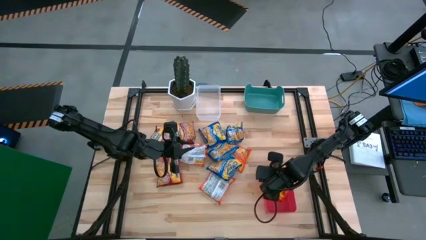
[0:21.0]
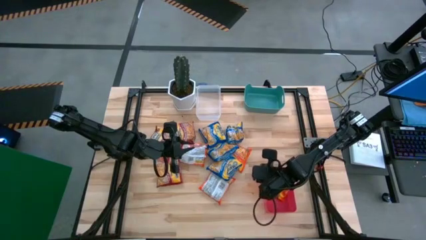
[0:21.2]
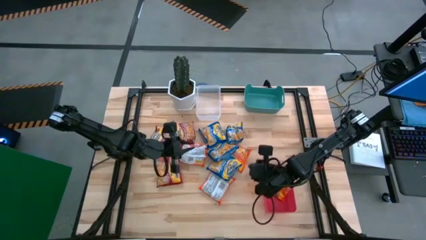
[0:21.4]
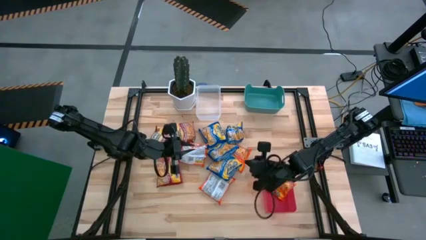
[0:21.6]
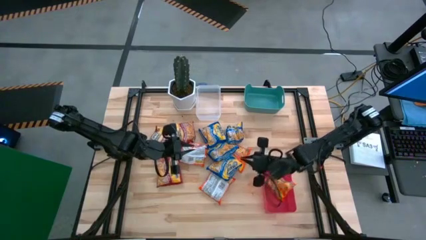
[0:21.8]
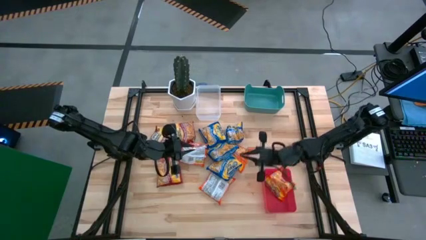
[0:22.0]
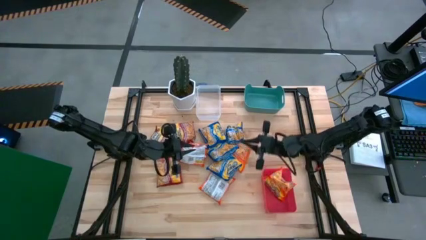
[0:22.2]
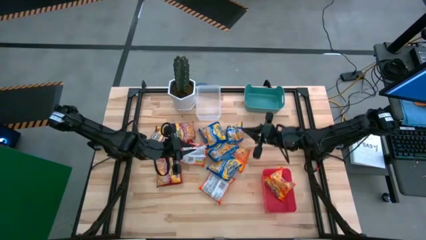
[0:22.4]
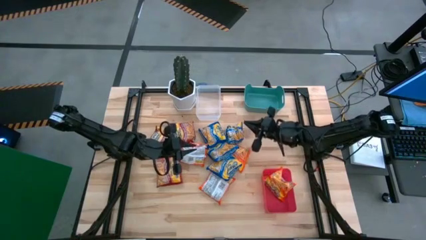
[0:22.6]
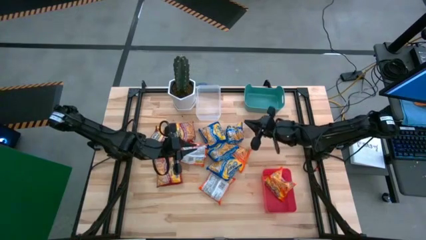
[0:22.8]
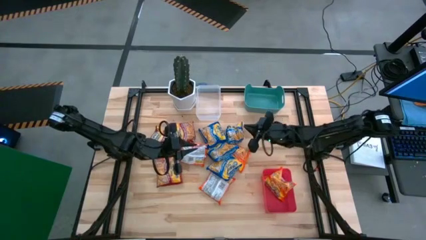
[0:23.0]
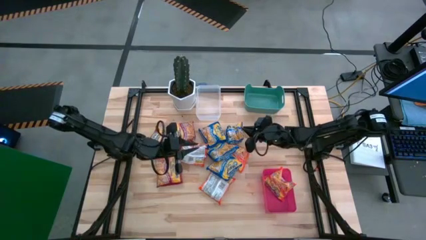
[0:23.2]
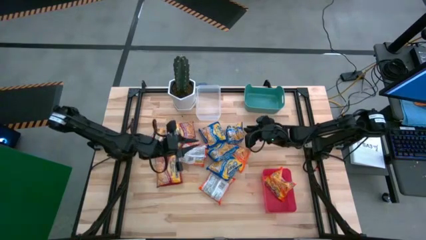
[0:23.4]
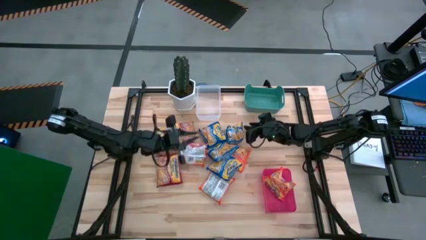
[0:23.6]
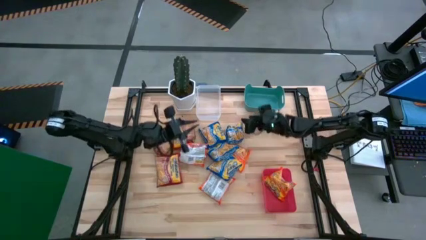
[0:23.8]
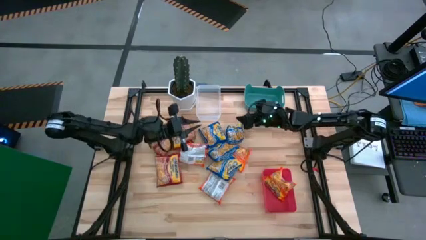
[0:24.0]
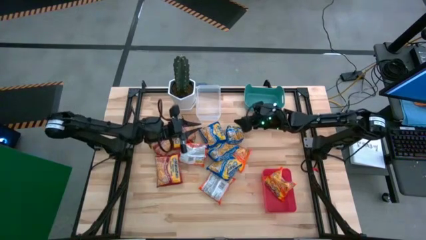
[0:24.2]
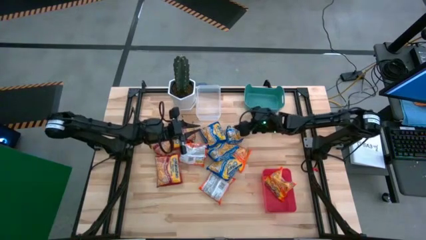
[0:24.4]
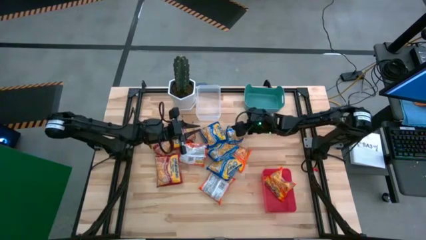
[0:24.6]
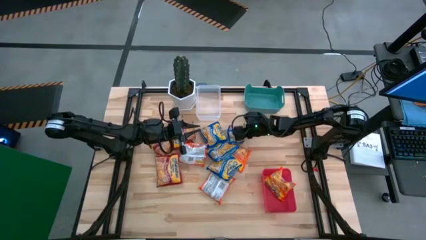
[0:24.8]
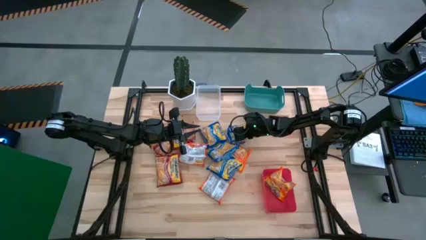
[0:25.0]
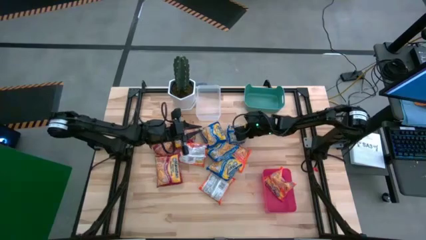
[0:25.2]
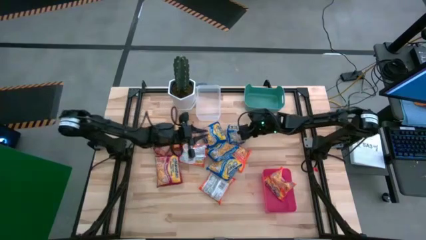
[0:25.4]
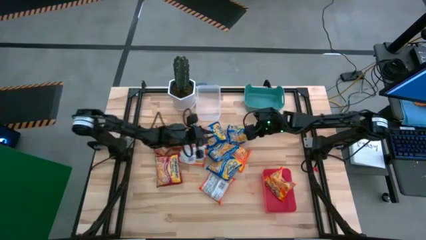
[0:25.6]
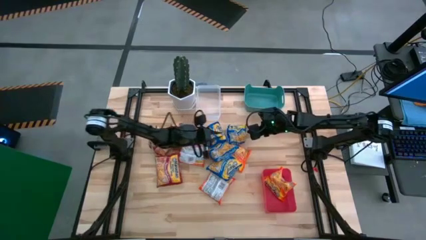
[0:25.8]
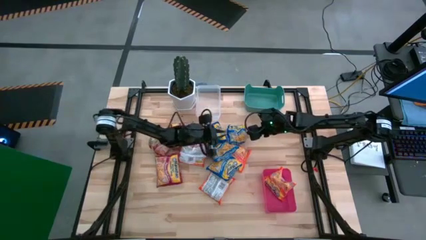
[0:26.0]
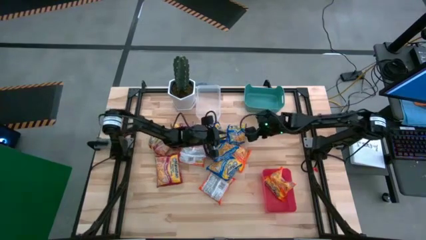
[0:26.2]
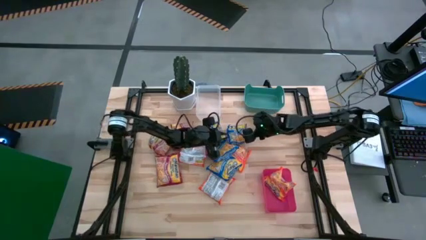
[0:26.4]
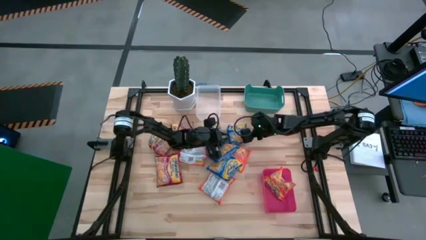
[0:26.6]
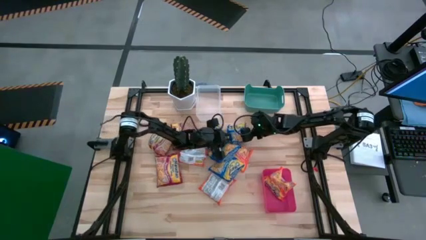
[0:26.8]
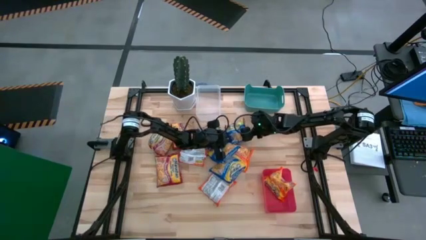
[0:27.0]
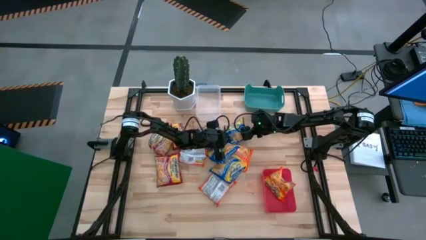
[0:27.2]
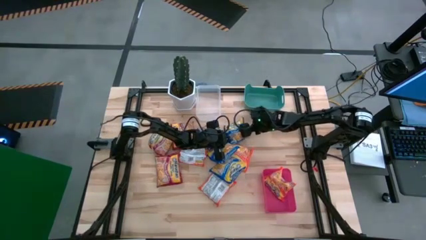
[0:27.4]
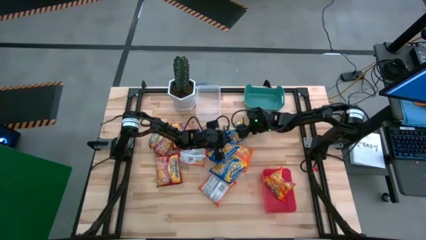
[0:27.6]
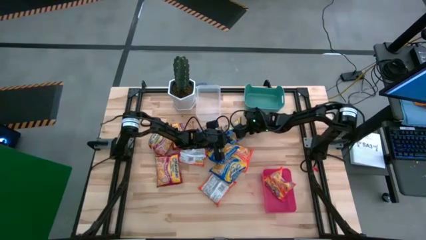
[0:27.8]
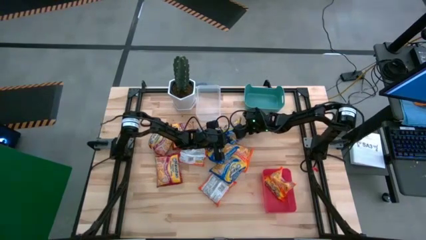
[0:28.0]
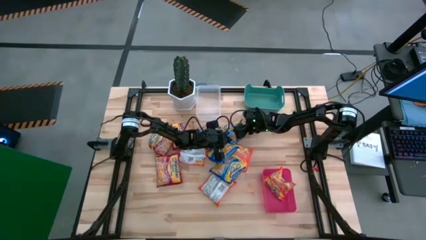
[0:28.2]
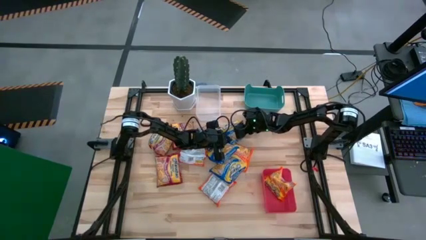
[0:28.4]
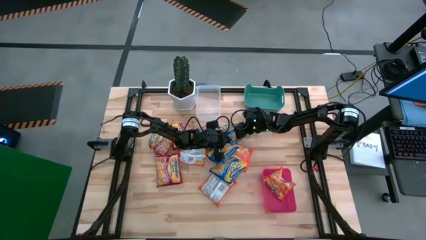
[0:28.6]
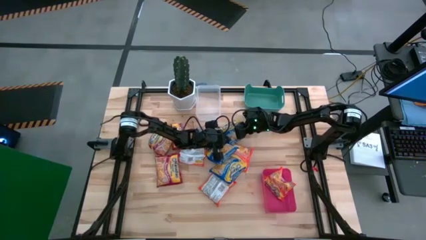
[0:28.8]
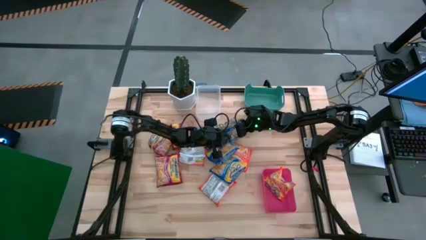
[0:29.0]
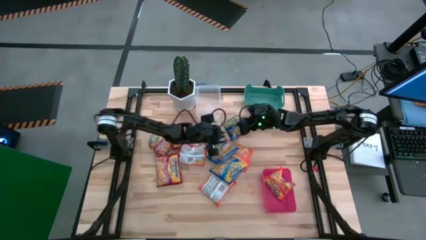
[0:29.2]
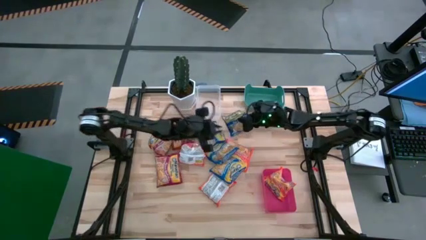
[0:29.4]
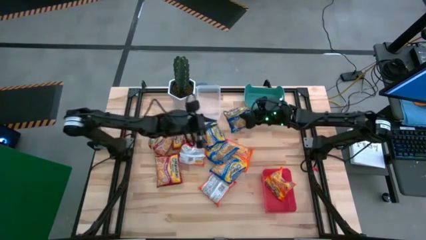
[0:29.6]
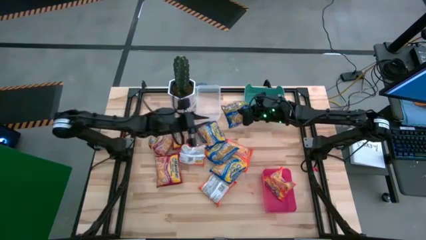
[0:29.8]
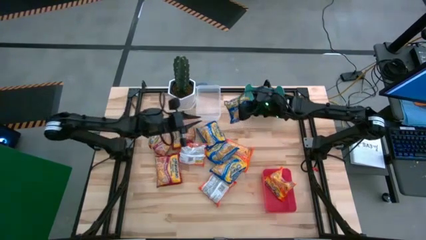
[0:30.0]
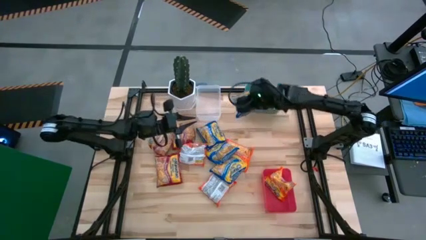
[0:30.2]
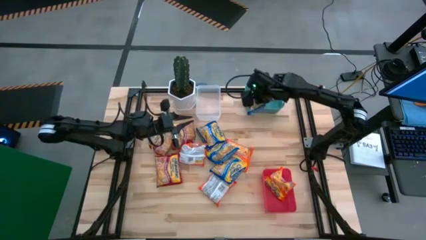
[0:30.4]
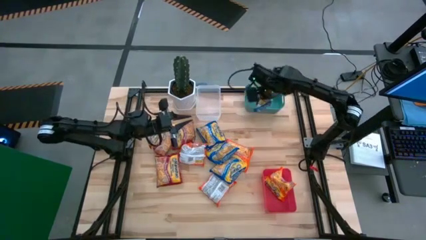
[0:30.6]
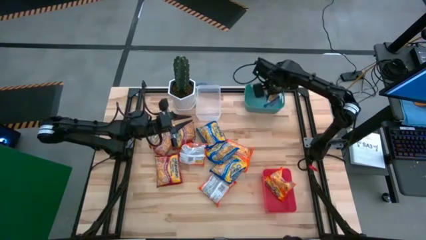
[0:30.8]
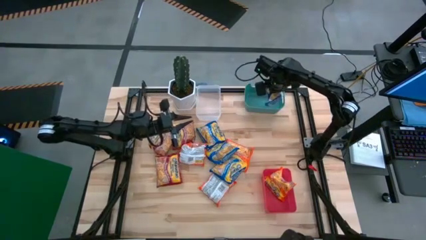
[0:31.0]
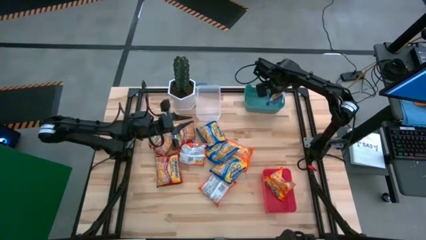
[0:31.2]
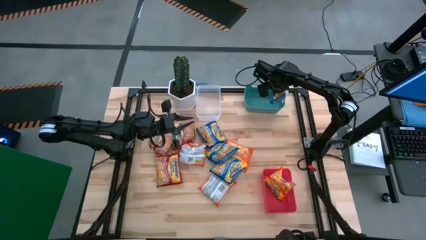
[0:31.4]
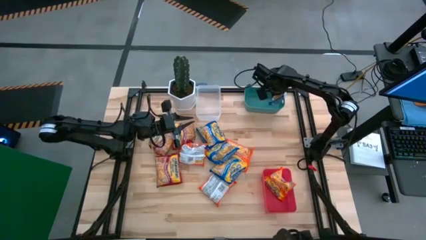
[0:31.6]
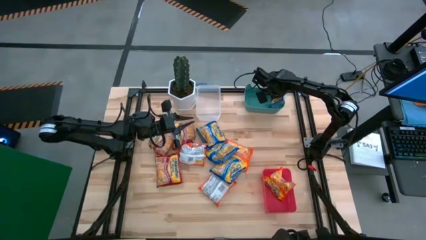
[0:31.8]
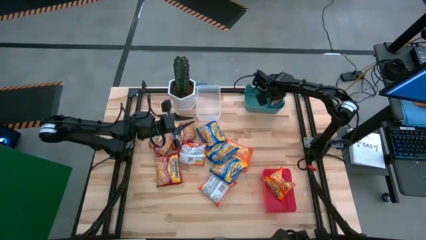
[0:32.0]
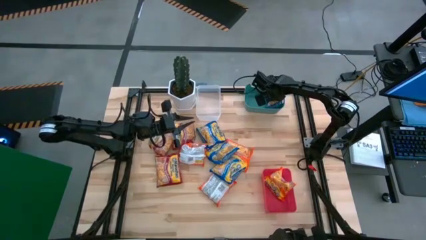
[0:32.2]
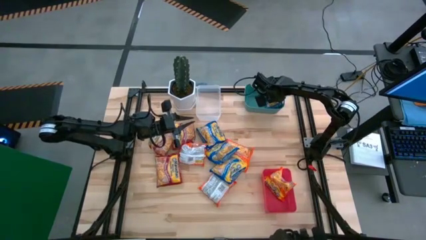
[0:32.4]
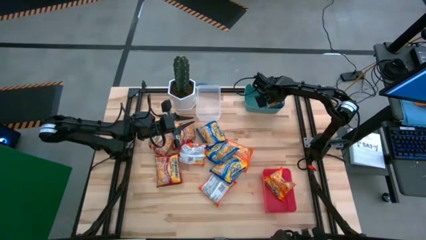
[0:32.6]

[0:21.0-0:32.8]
Task: Sort Maruchan noodles
Put the blue noodle pack into the green bin

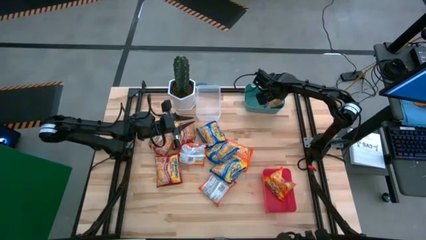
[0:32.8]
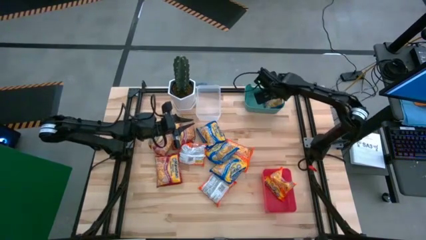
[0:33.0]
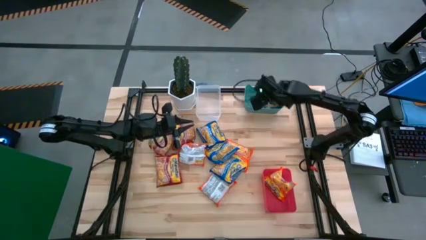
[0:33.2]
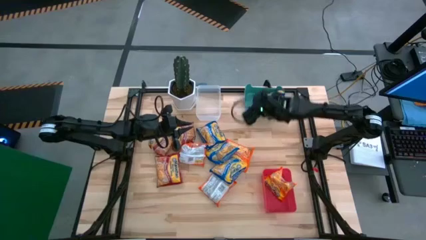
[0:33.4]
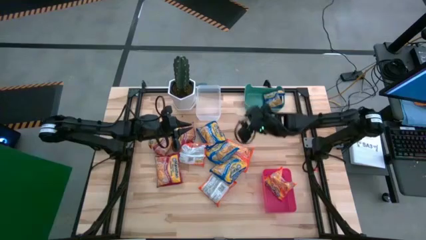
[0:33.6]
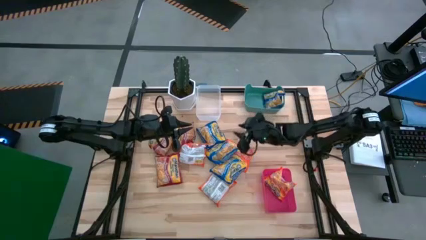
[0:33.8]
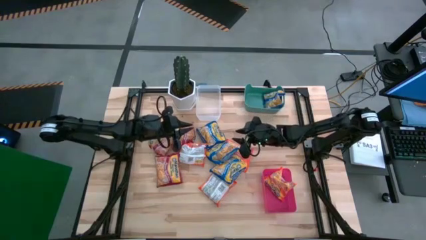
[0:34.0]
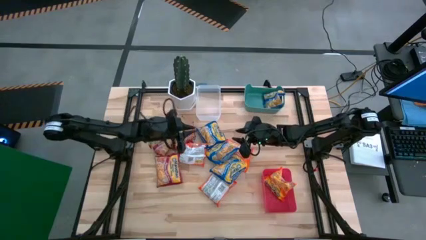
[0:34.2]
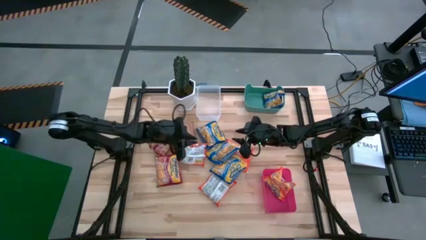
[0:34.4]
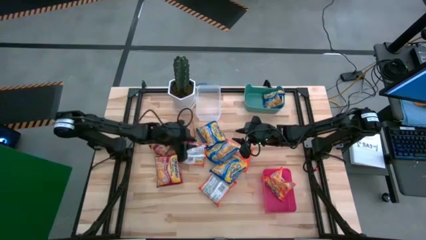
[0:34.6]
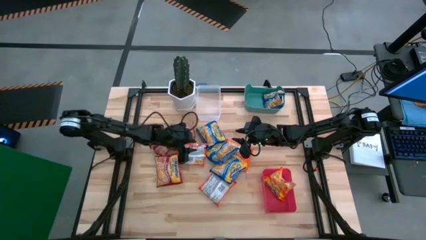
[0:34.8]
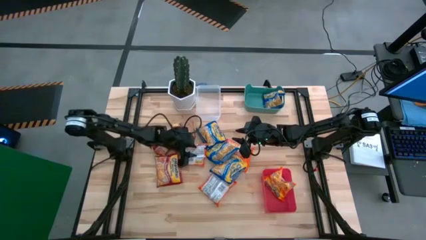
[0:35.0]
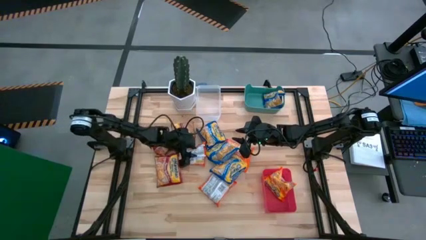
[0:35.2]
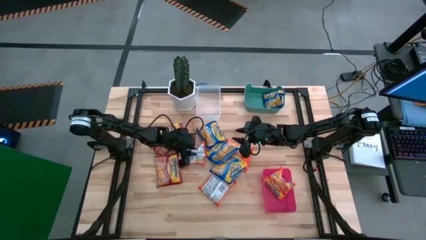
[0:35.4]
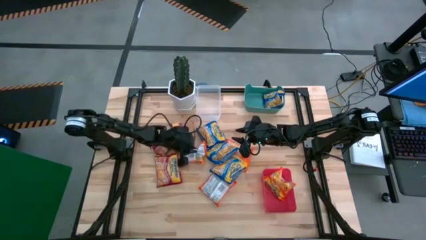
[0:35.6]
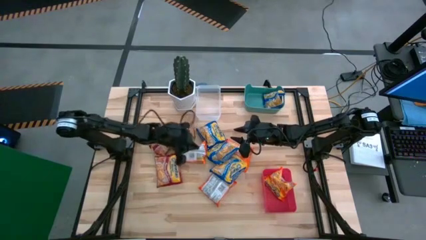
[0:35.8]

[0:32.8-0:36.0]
Put the orange noodle pack into the transparent bin
